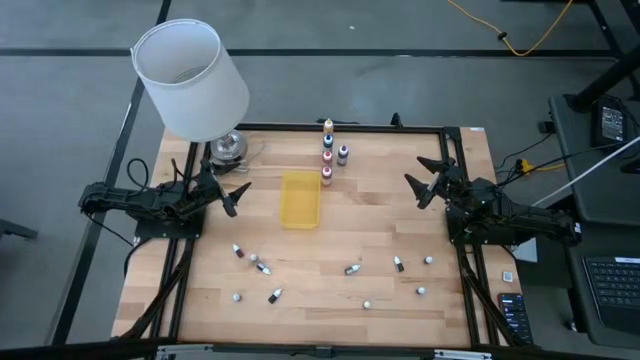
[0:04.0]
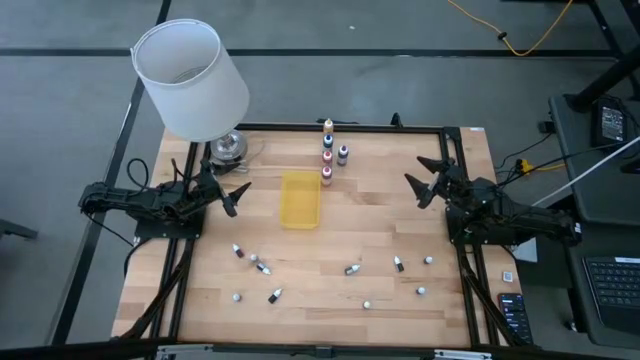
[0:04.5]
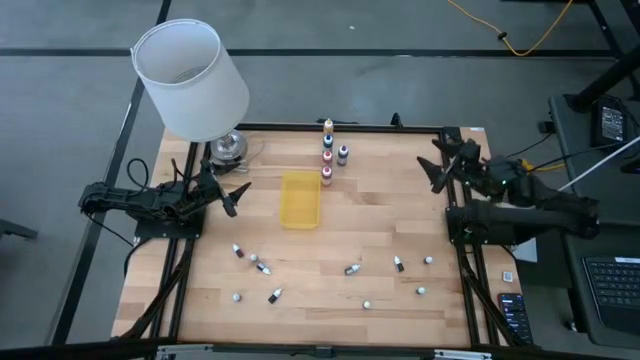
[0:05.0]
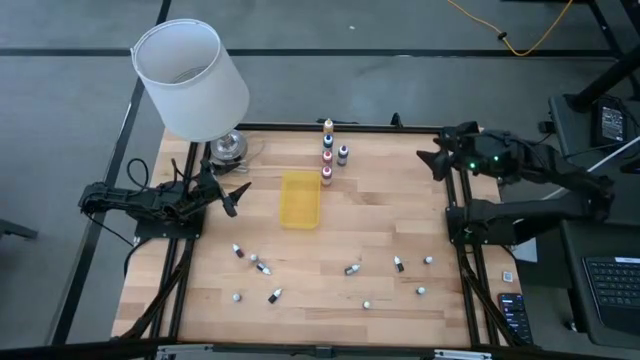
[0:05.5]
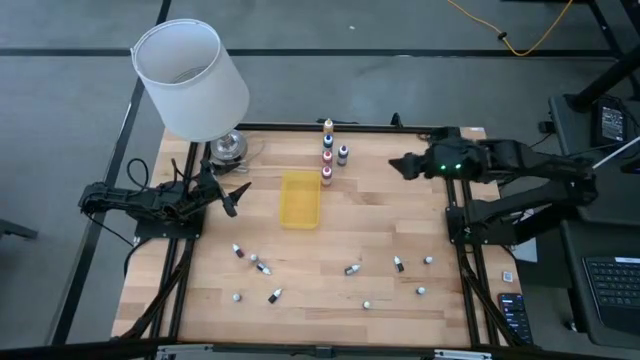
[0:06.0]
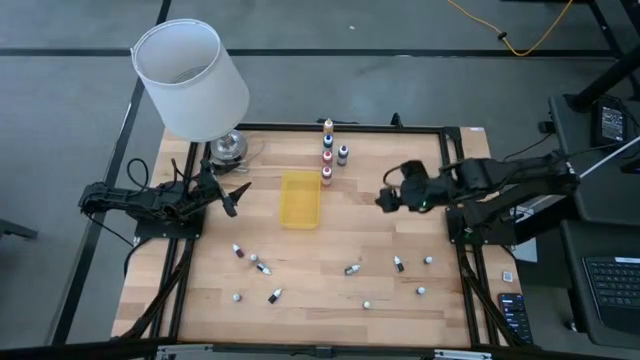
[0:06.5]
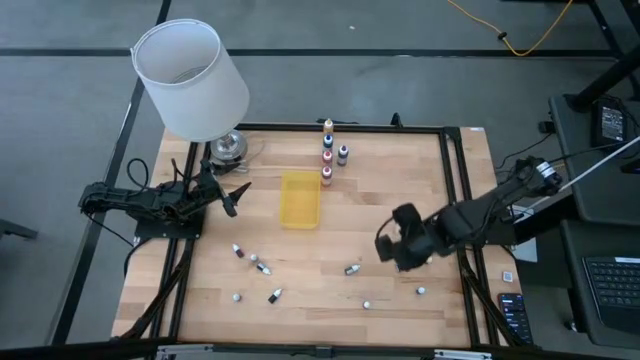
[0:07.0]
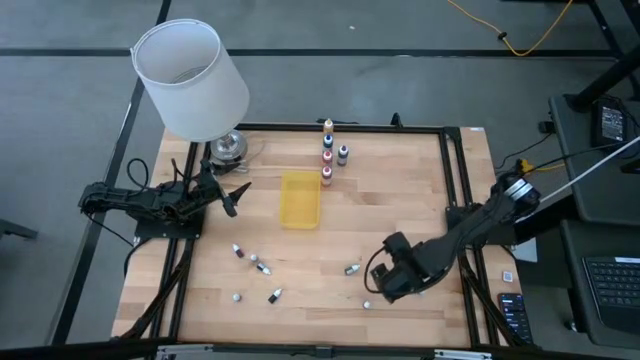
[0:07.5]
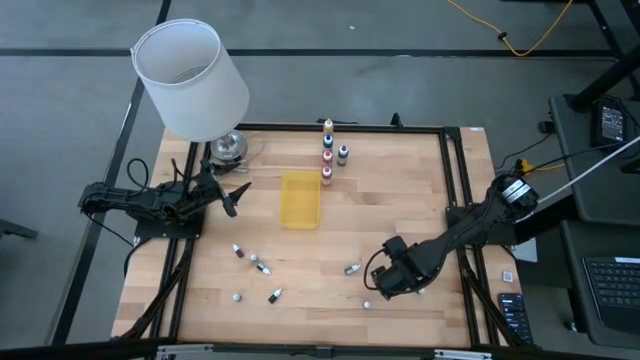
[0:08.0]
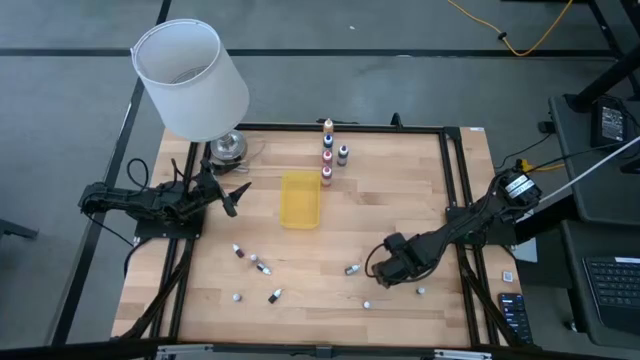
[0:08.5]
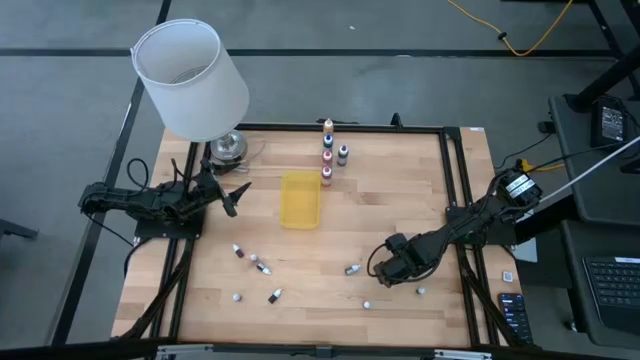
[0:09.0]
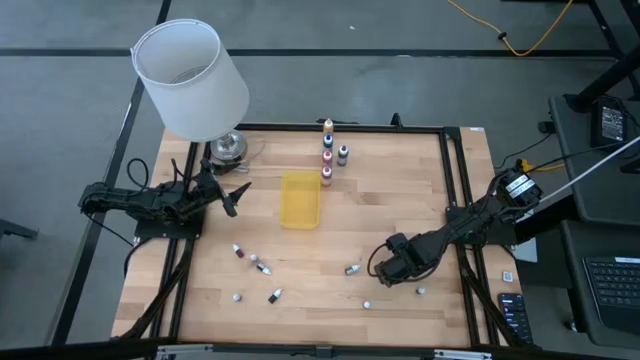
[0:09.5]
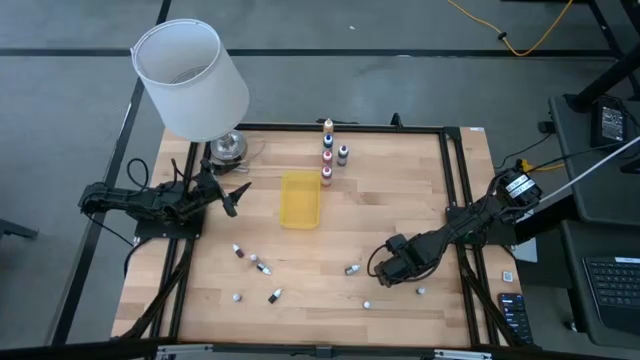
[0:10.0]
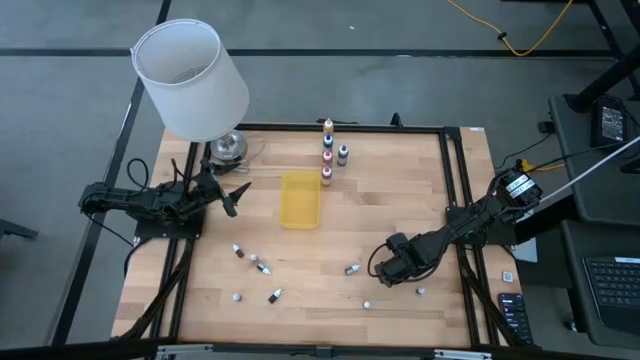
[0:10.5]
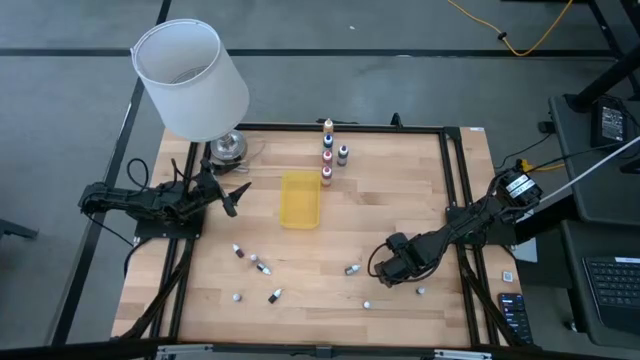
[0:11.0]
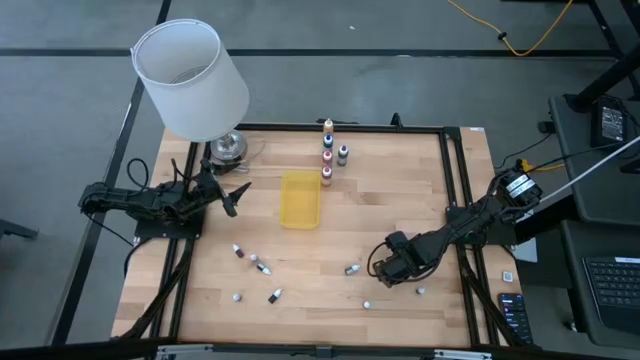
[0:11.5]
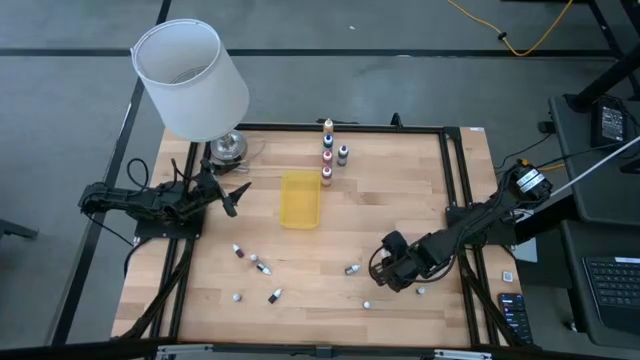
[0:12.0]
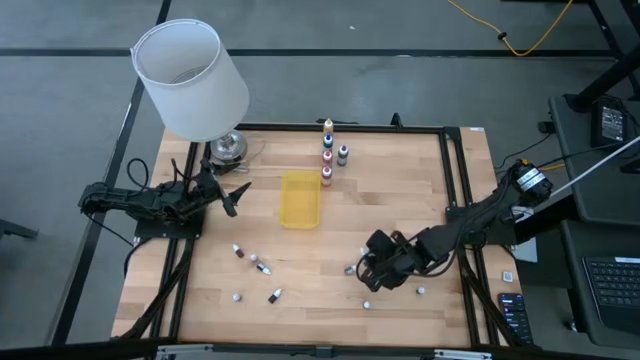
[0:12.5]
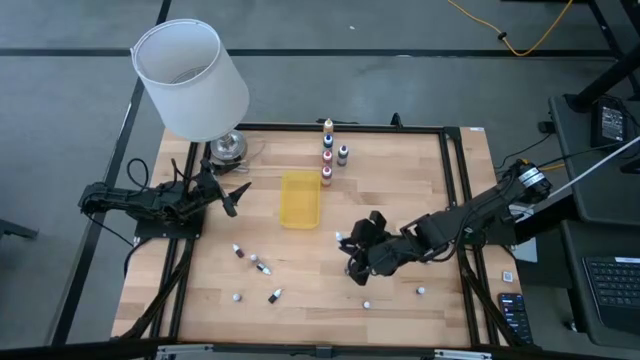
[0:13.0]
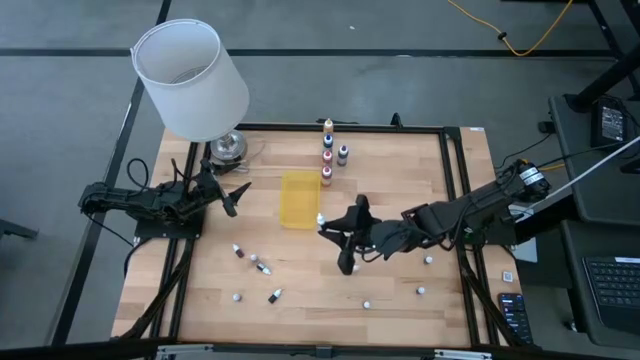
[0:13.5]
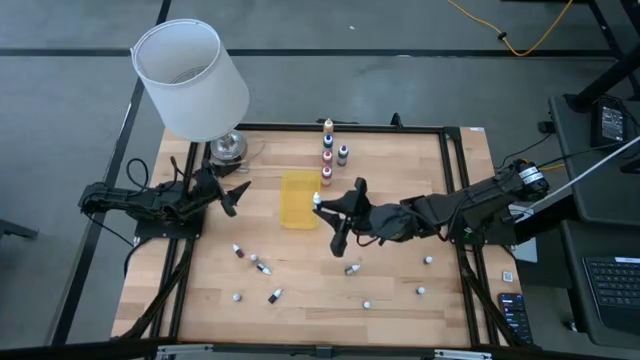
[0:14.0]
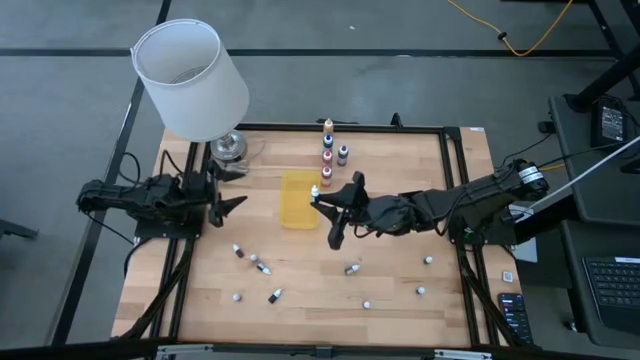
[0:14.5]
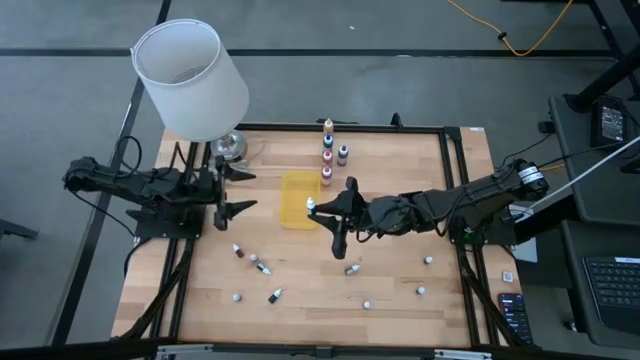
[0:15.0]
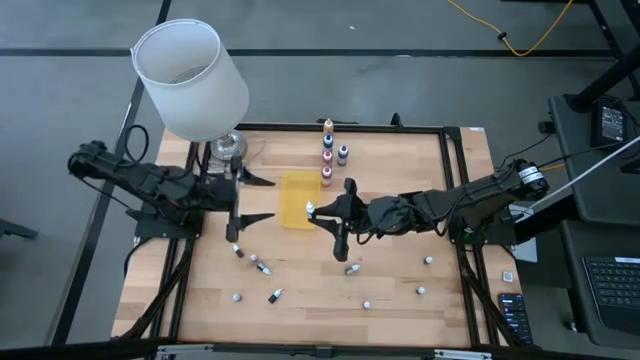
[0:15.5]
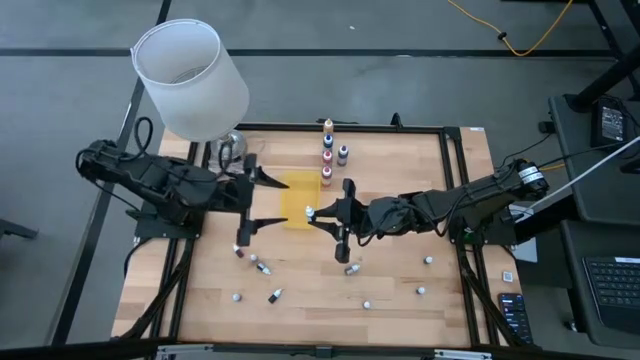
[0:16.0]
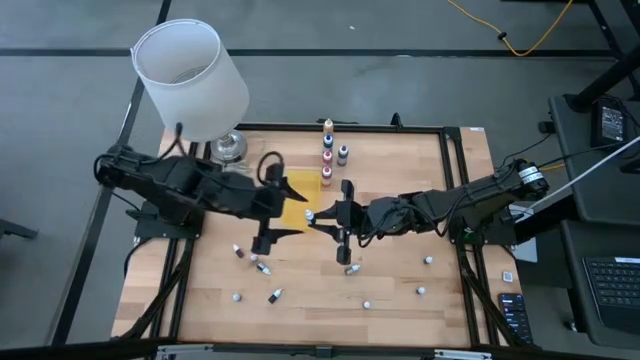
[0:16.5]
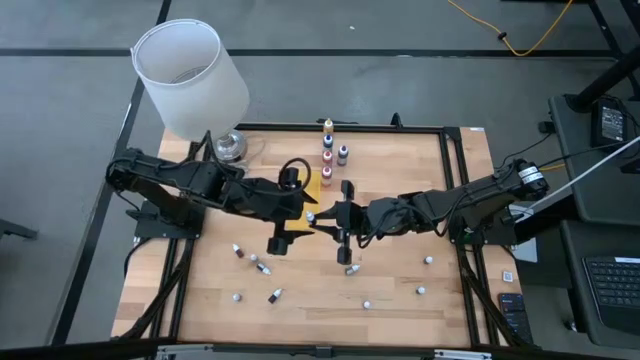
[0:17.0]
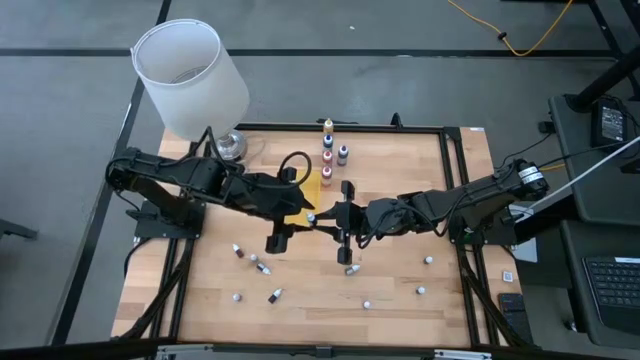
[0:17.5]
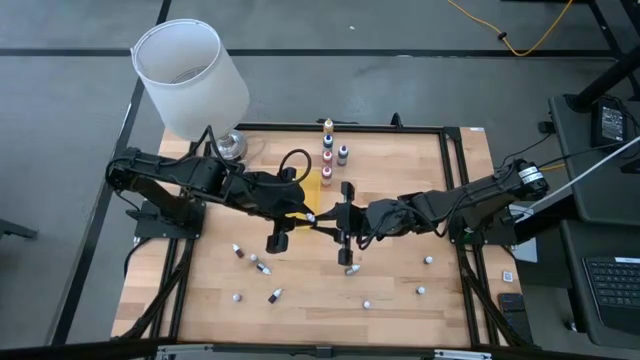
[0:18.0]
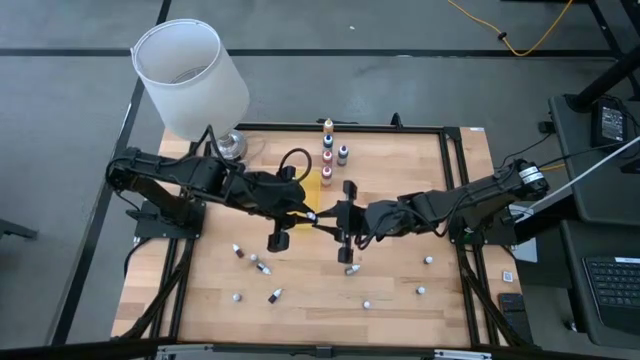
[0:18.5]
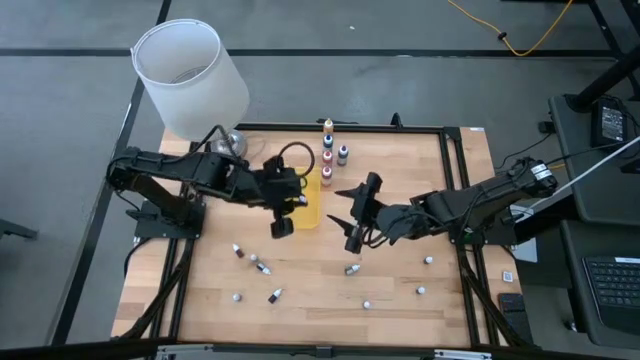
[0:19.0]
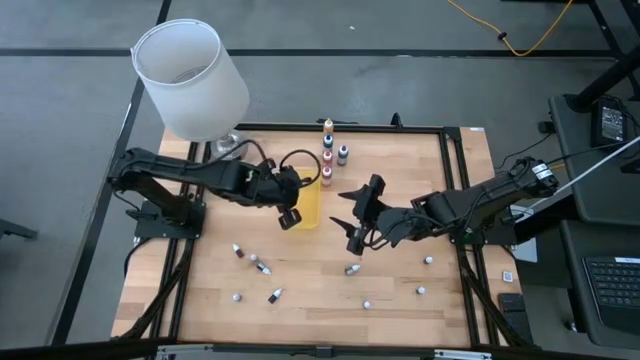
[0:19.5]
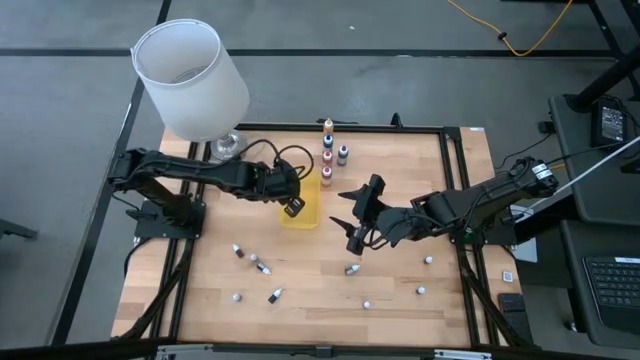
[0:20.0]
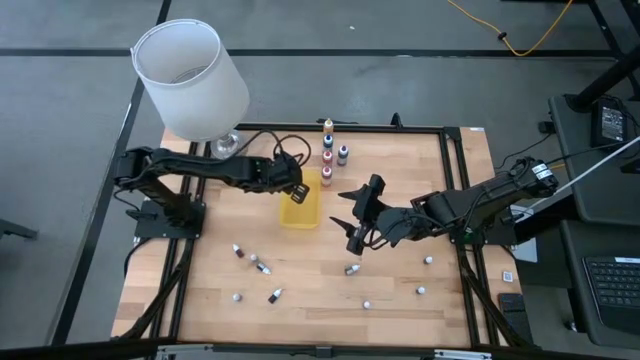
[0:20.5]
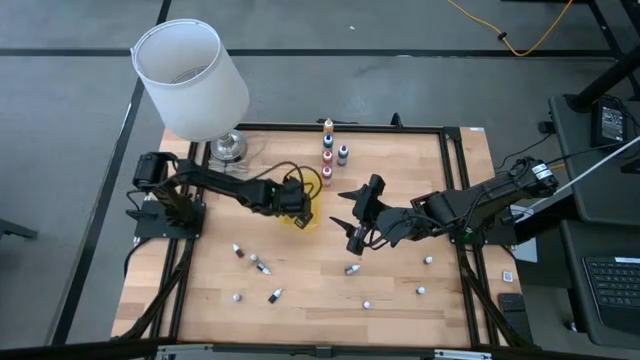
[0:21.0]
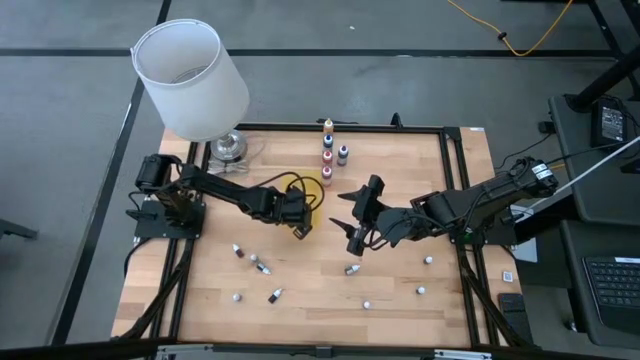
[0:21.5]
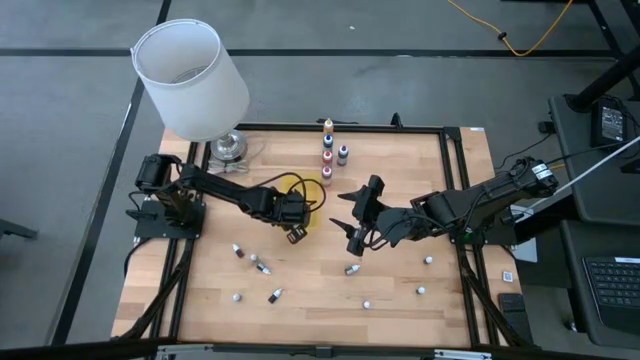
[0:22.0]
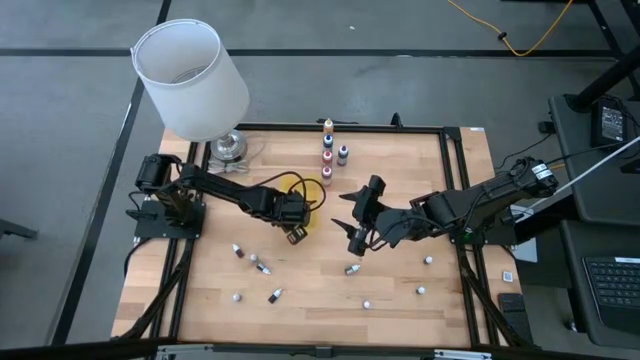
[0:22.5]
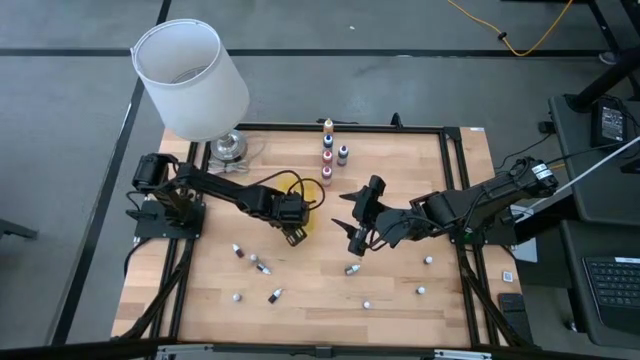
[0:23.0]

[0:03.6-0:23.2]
Task: Pick & Place food coloring
Put the small green bottle into the yellow bin
